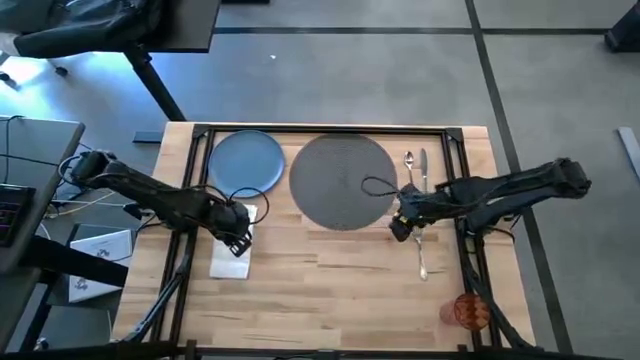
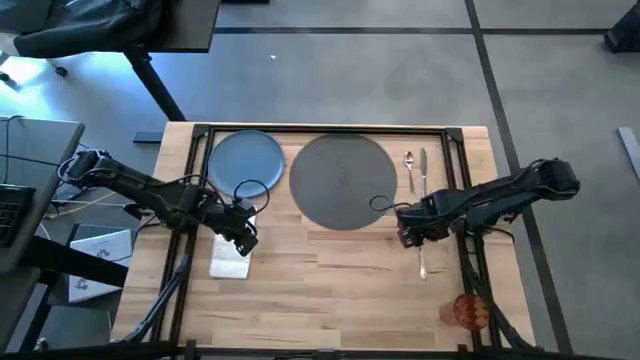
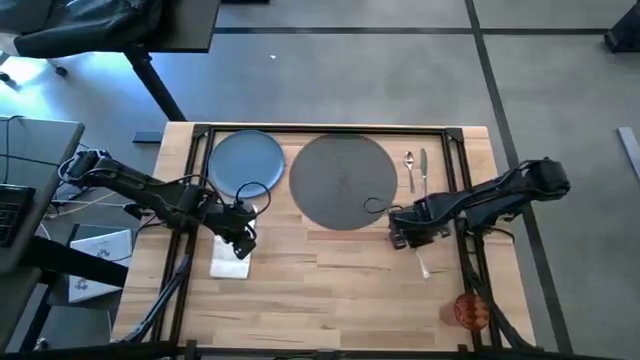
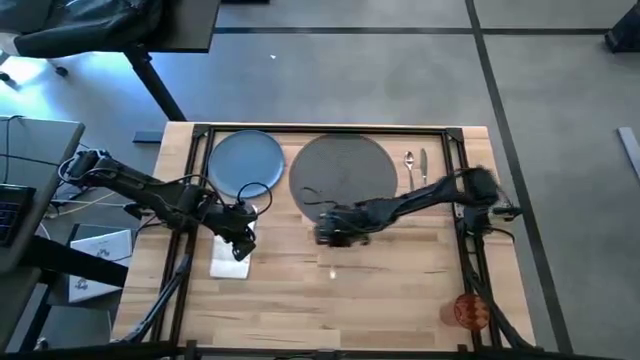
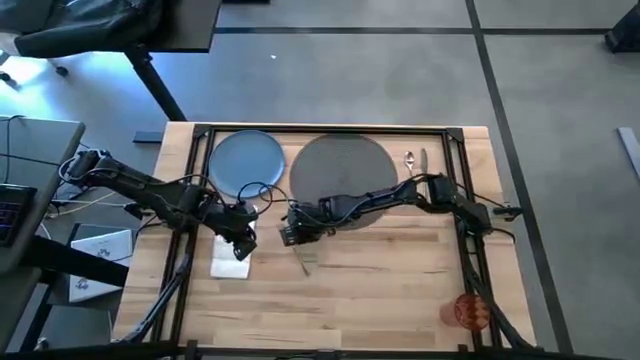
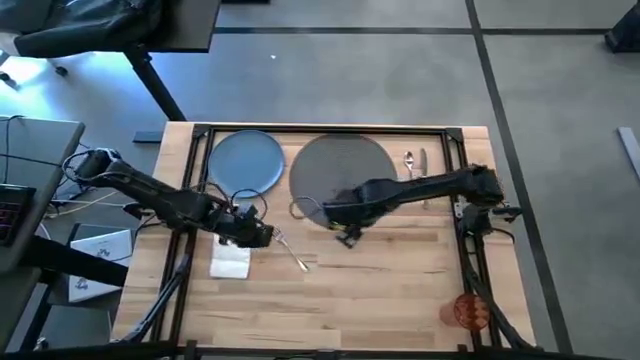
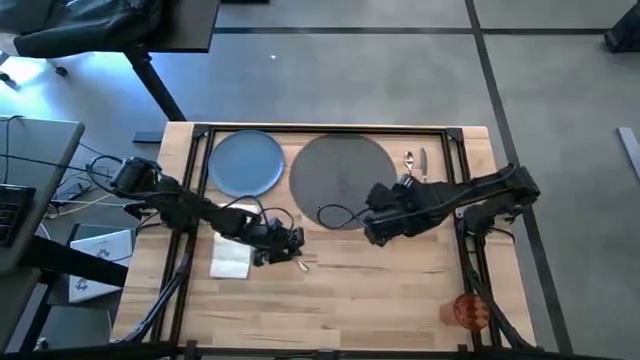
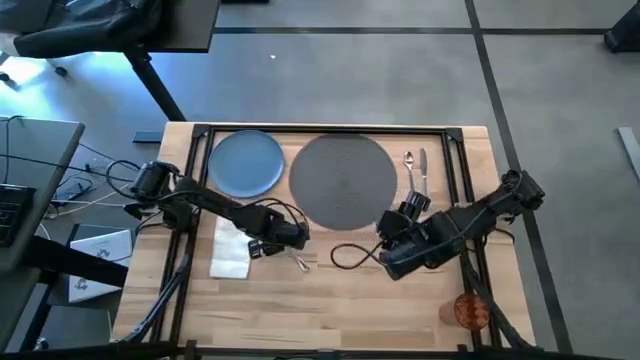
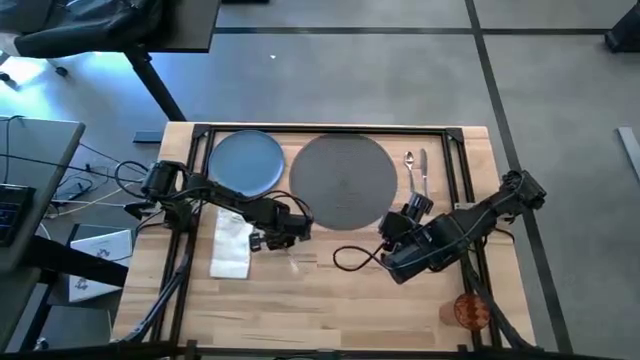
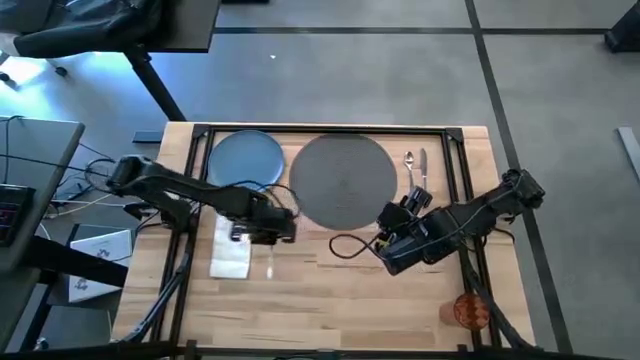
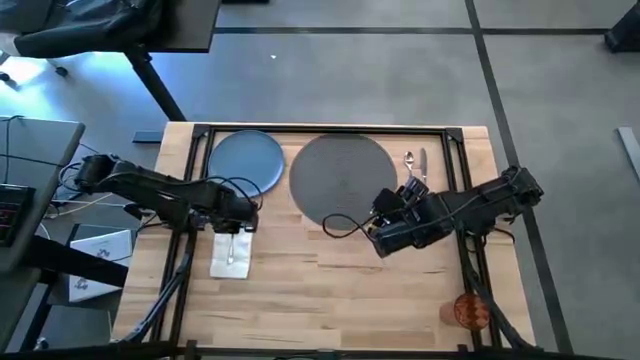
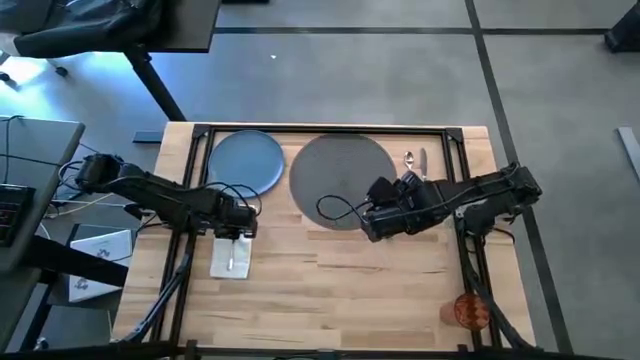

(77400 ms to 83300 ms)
Task: Set table place
Move the gray table mat to the center

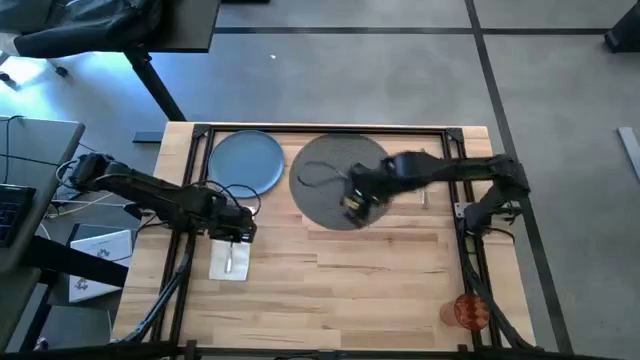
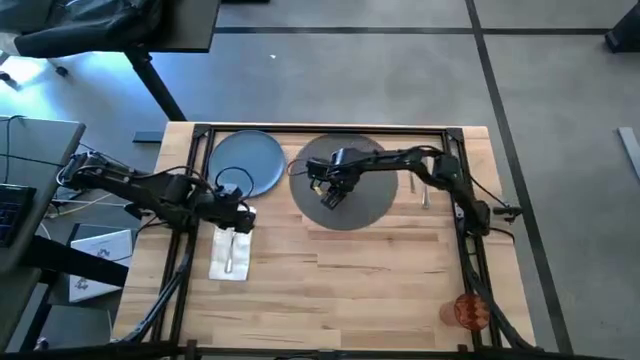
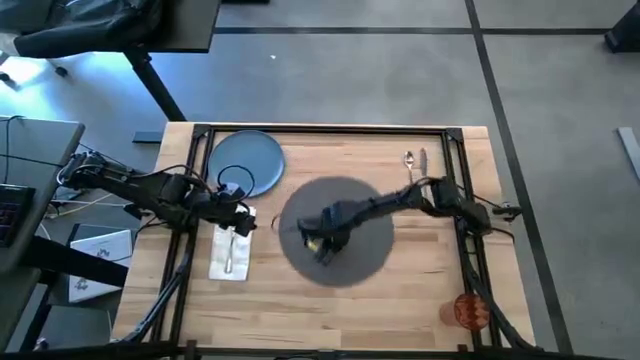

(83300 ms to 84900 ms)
Put the silver fork on the napkin

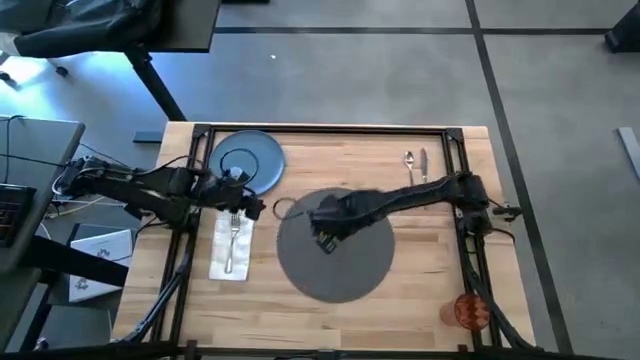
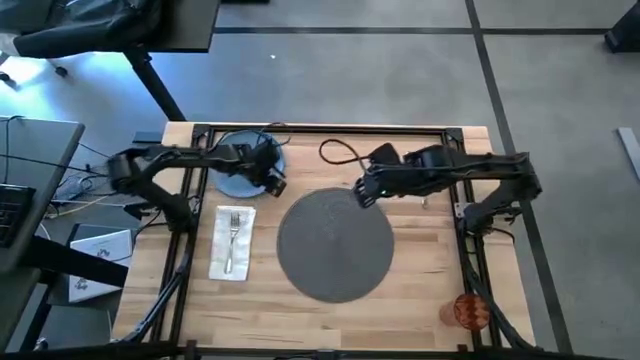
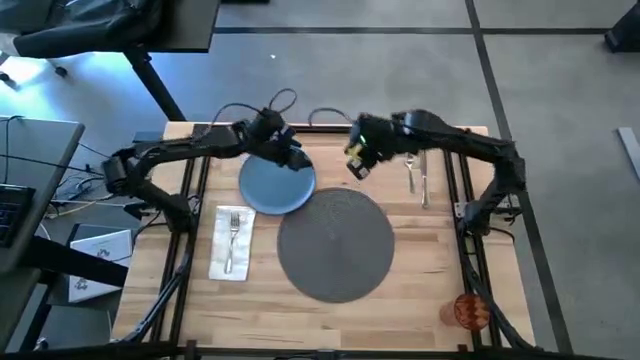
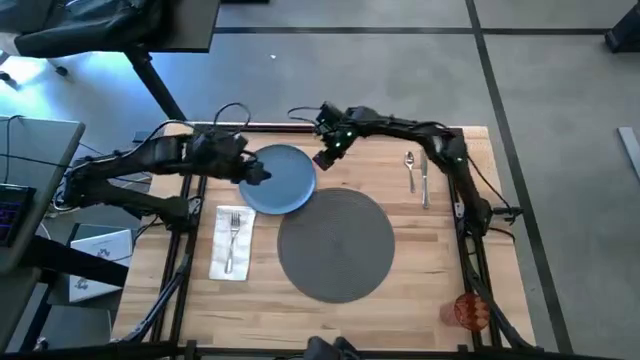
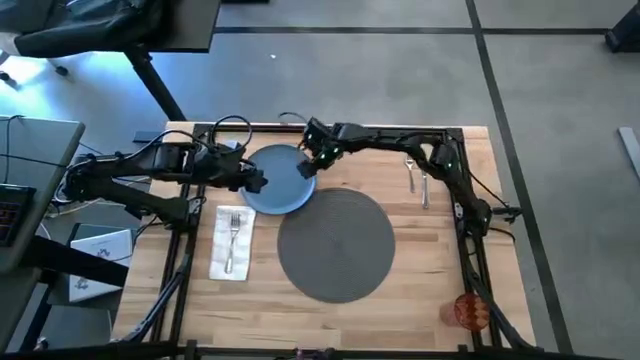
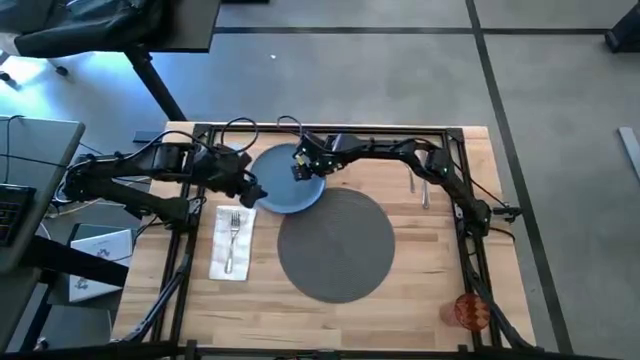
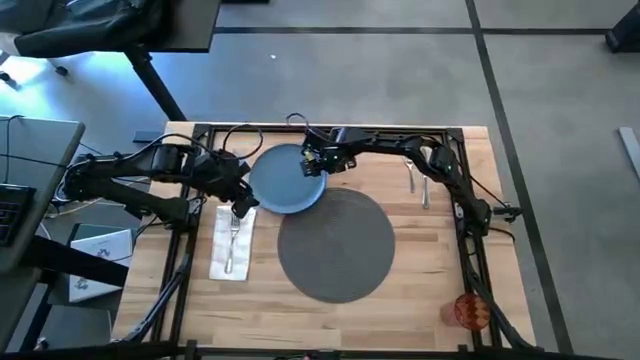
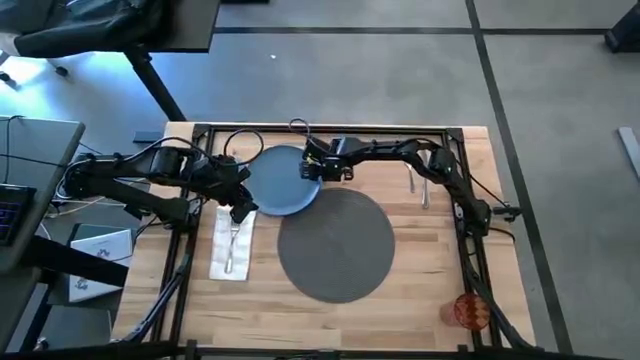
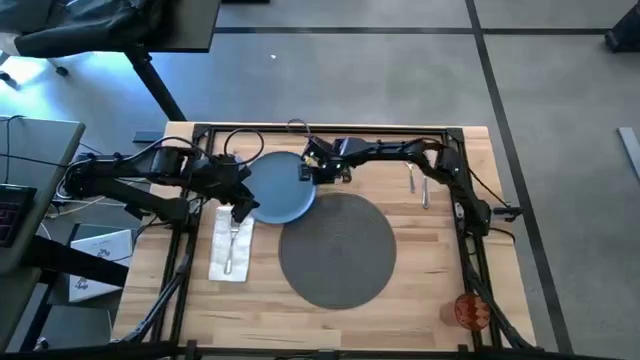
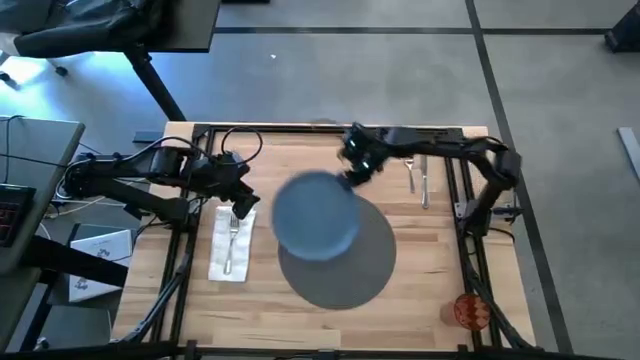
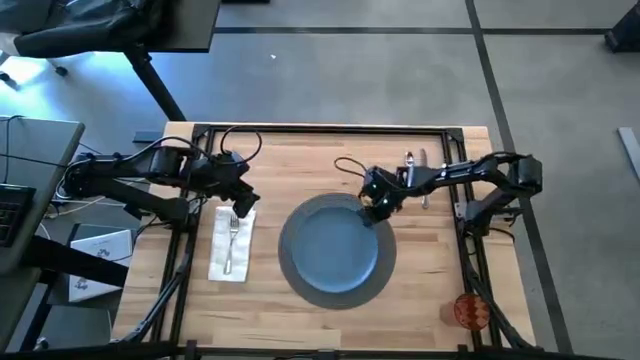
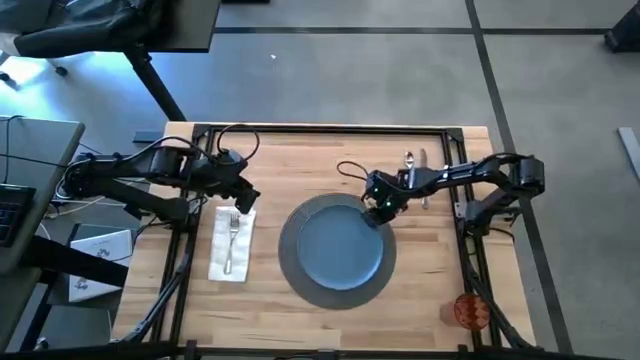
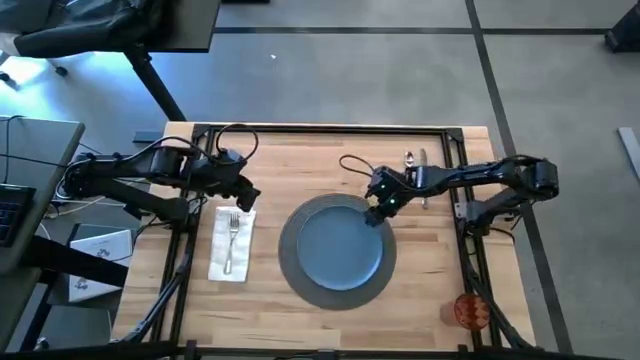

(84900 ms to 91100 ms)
Put the blue plate on the gray table mat

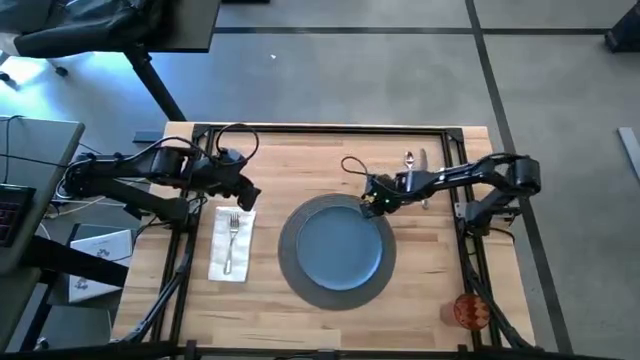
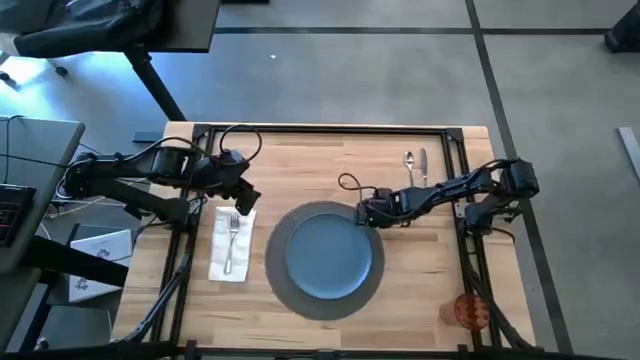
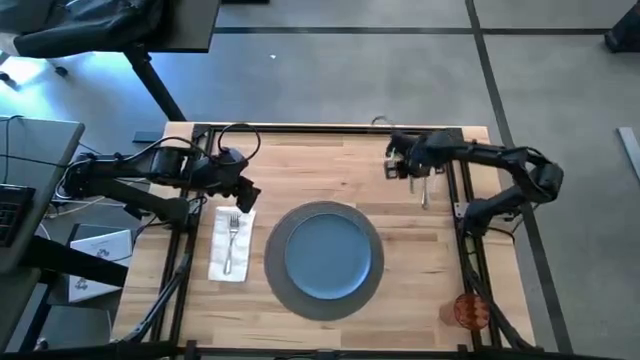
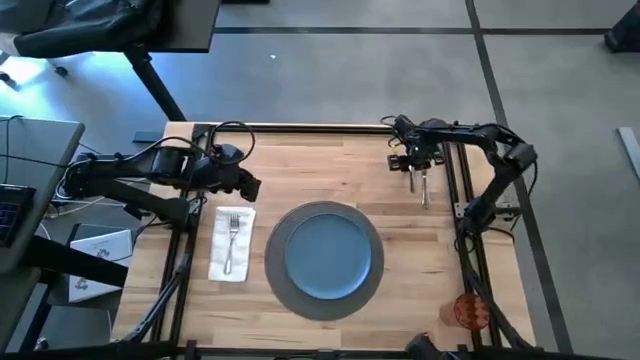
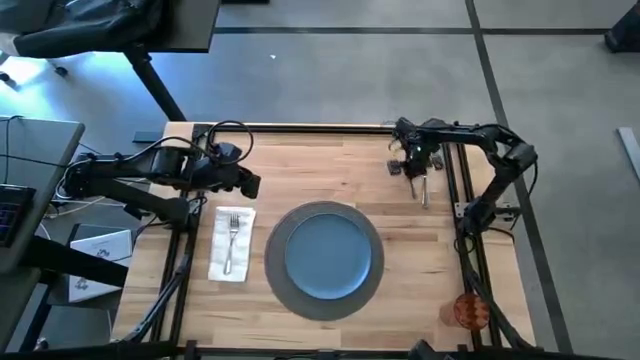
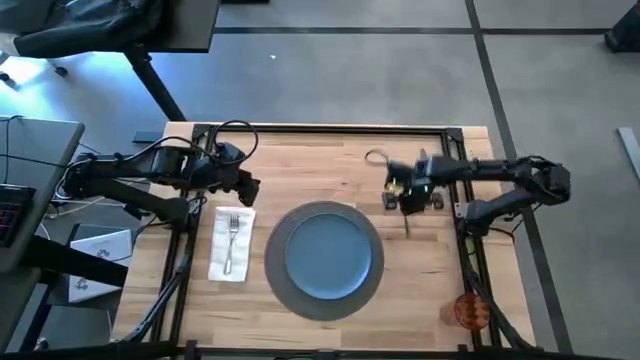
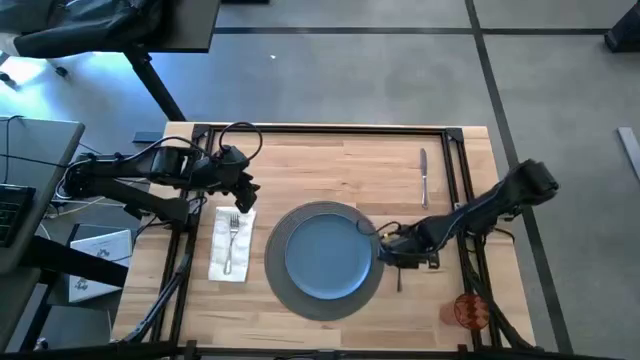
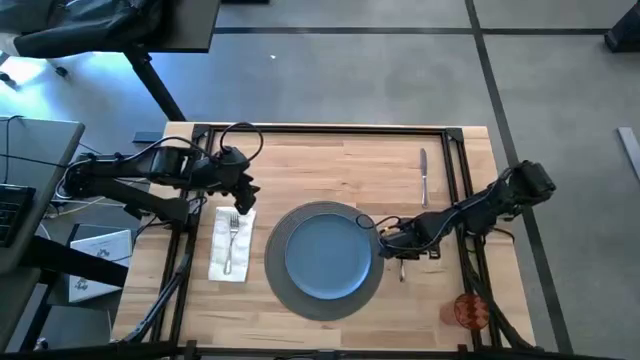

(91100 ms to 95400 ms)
Move the silver silver spoon to the right of the gray table mat

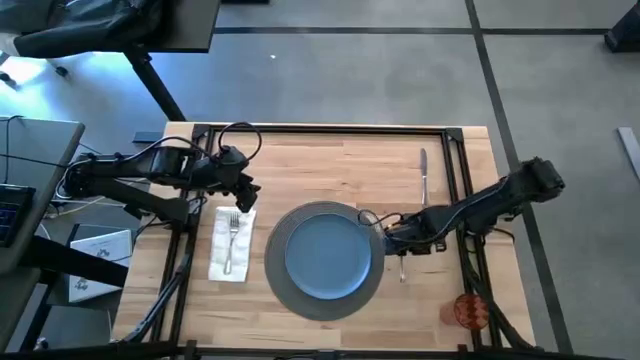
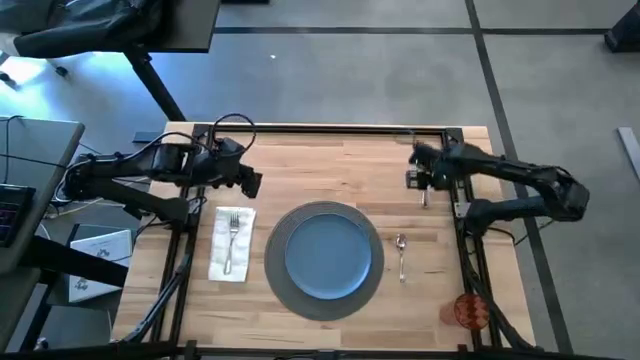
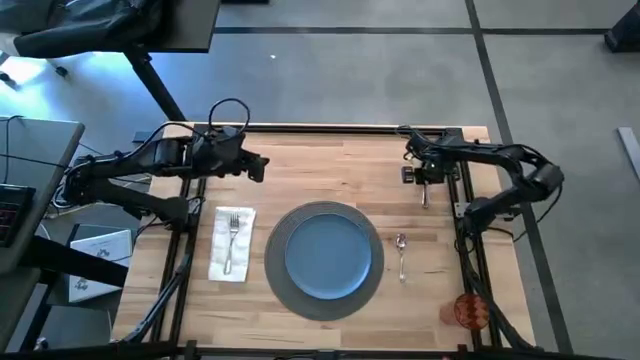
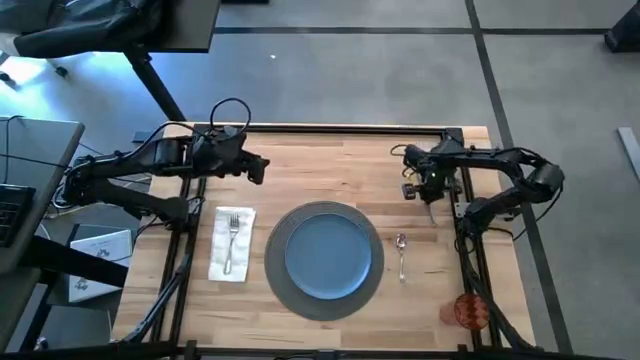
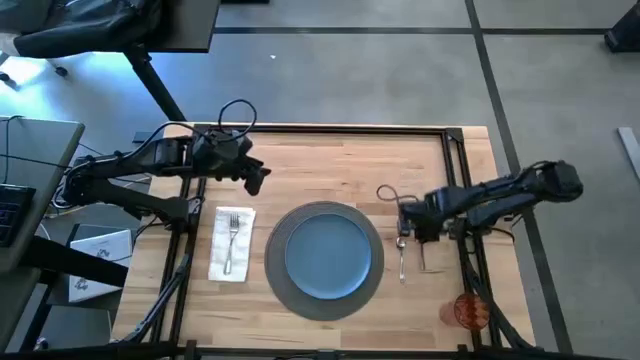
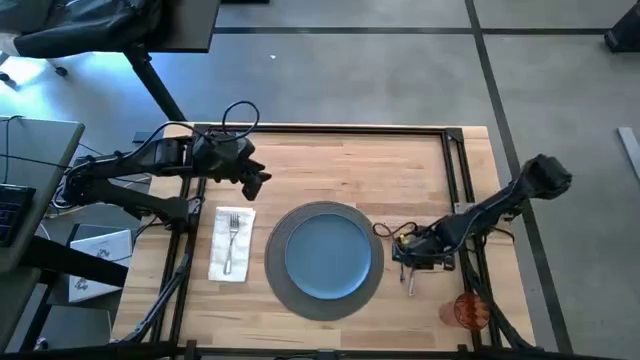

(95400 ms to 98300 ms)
Move the silver table knife to the right of the gray table mat

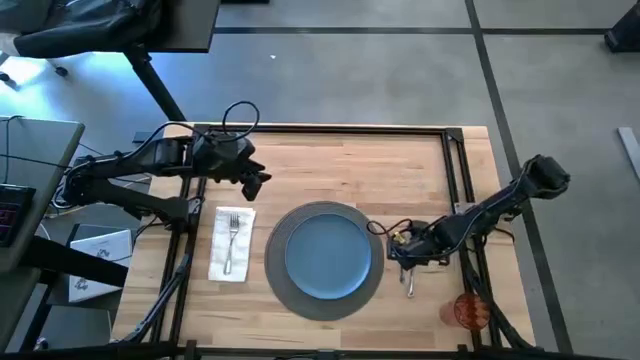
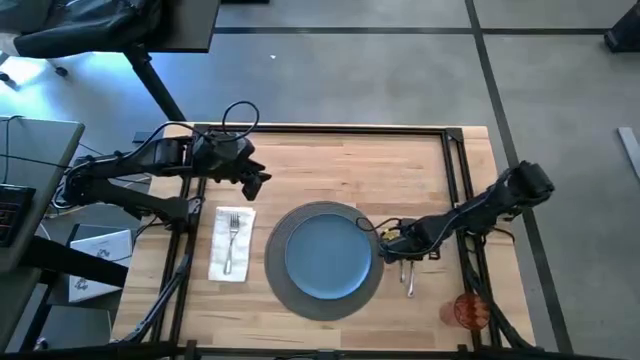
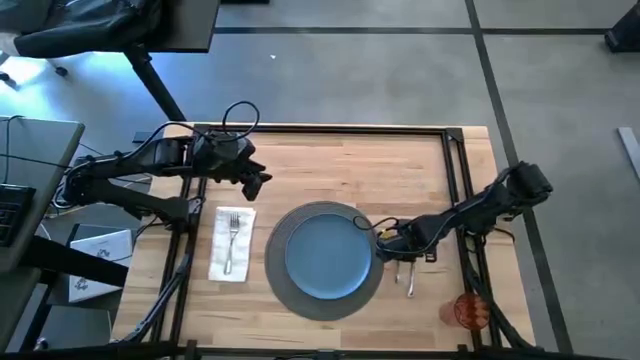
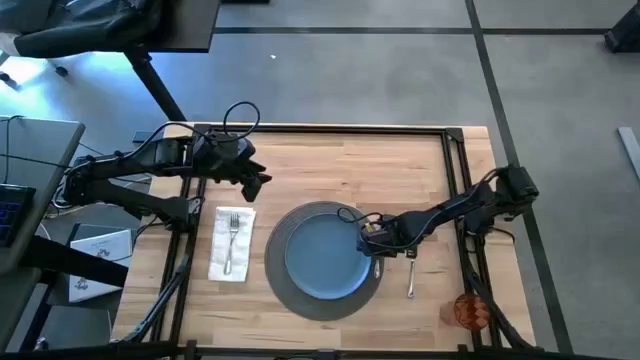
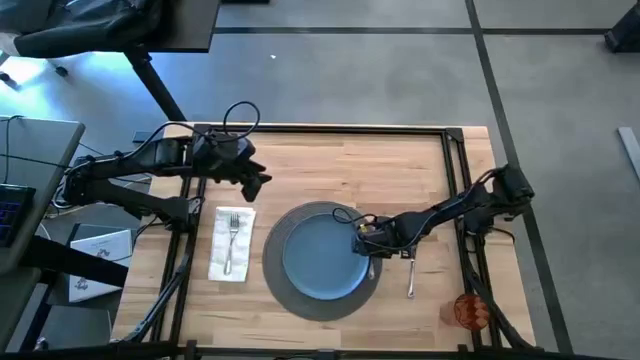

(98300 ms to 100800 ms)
Put the silver silver spoon on the gray table mat to the right of the blue plate
